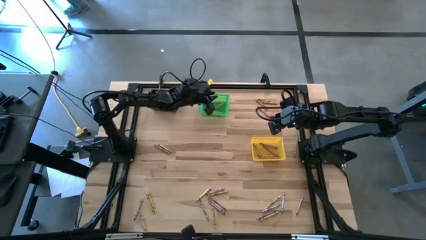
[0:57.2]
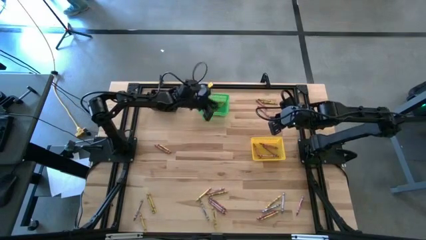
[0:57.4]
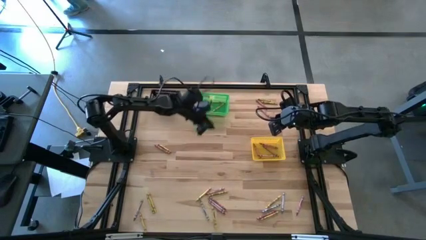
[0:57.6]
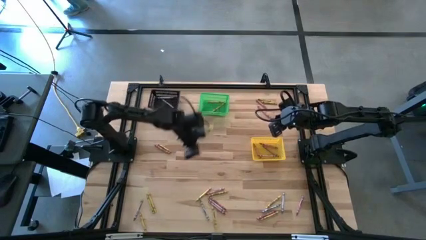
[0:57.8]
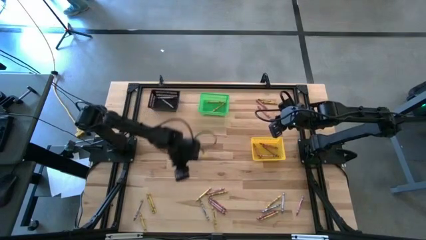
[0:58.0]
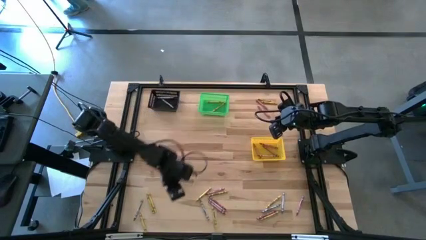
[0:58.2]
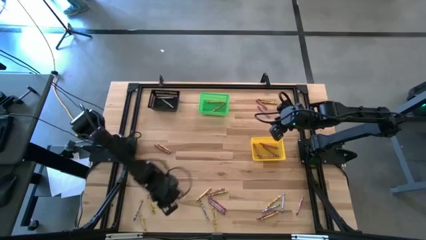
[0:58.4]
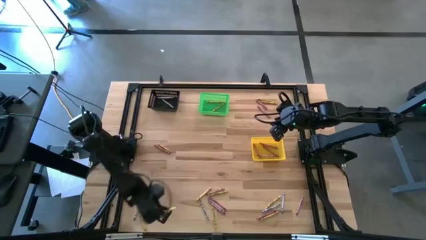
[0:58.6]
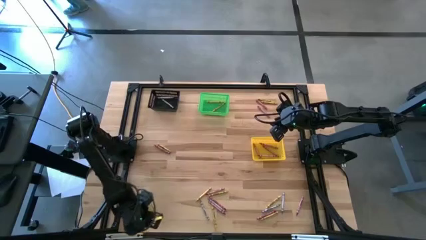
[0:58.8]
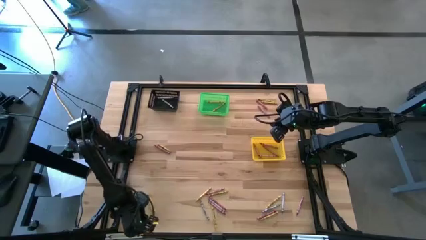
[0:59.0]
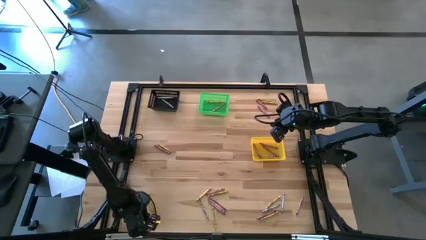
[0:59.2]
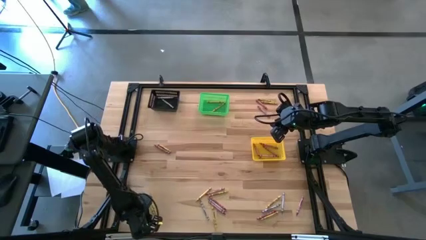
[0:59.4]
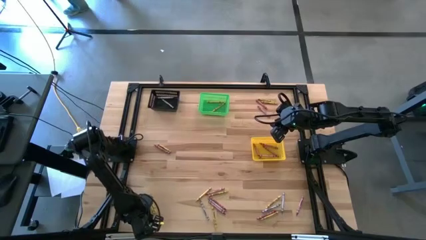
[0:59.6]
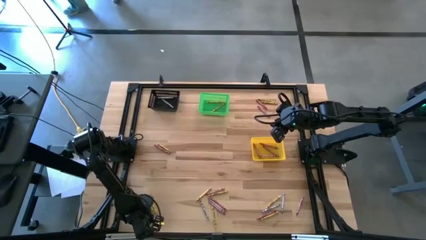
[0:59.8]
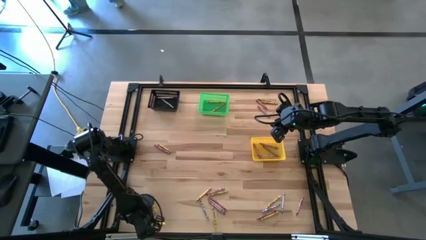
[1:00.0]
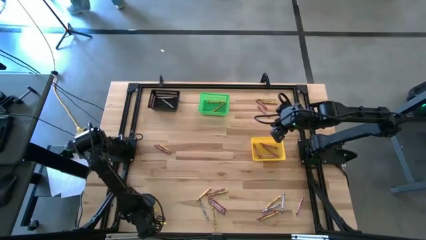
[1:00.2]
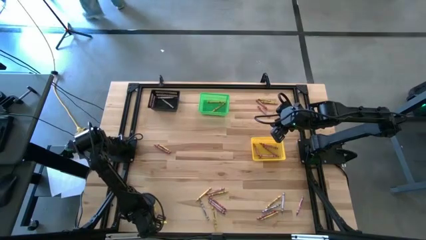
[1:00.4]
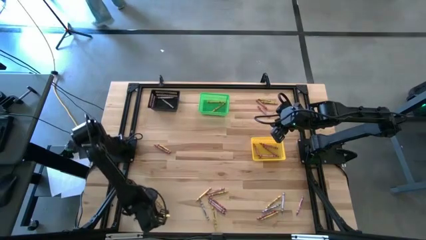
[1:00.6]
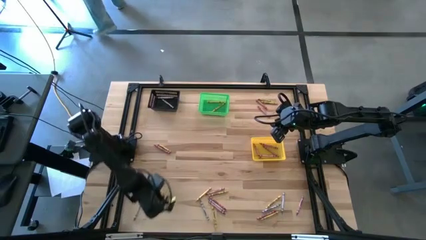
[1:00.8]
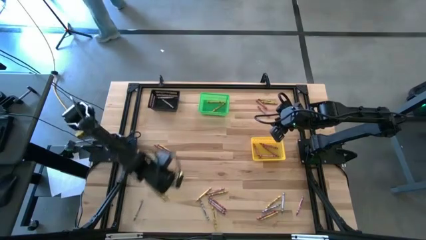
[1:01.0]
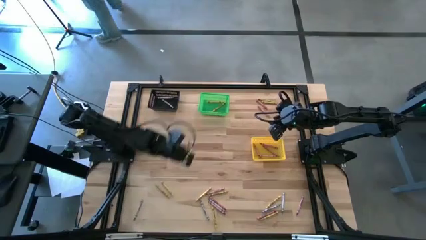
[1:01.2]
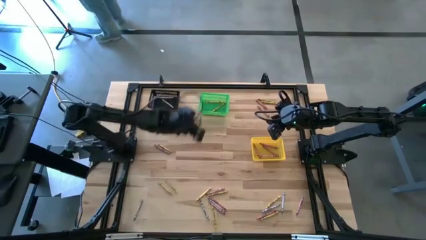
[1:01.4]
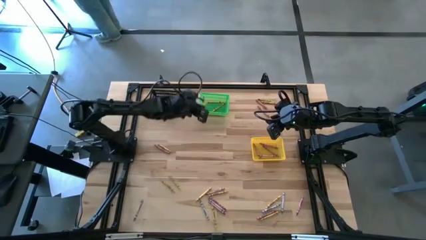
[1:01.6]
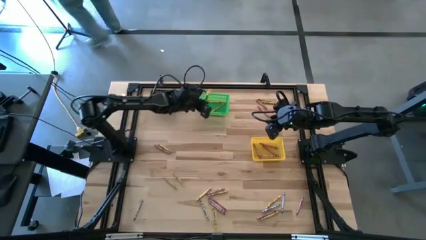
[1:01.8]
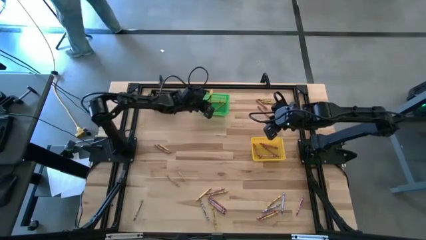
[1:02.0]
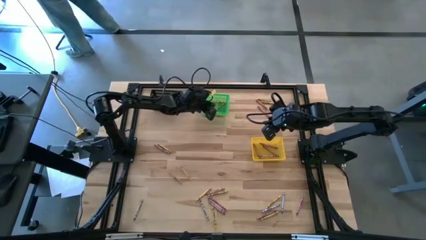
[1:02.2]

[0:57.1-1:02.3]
Task: Sort crayons
Put the yellow crayon into the green basket

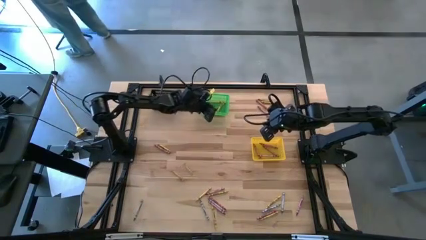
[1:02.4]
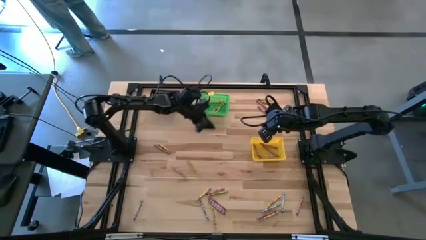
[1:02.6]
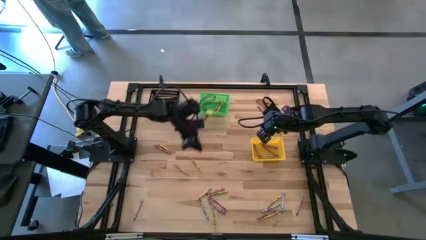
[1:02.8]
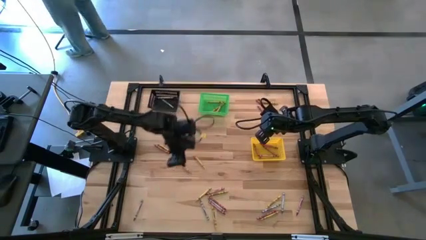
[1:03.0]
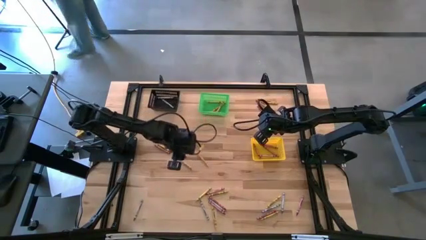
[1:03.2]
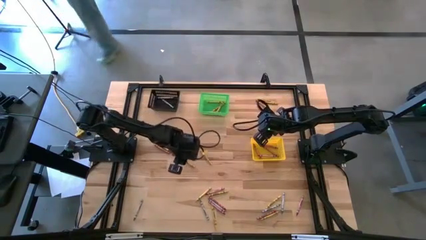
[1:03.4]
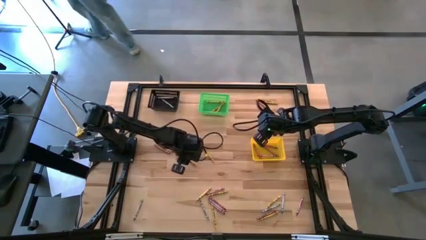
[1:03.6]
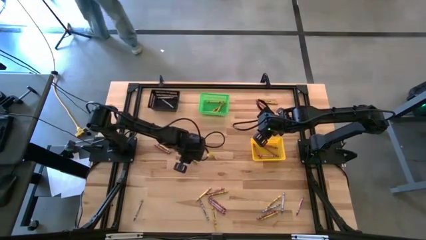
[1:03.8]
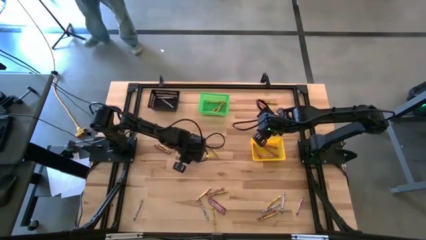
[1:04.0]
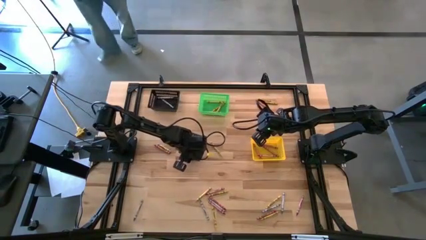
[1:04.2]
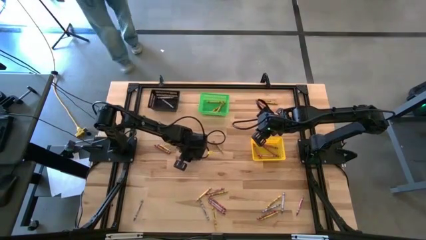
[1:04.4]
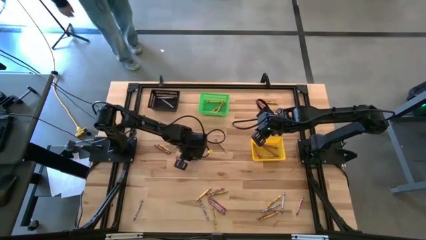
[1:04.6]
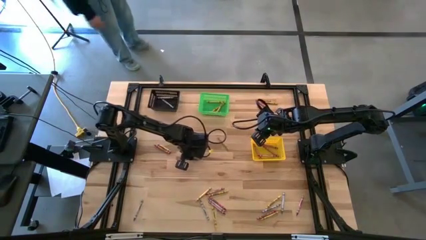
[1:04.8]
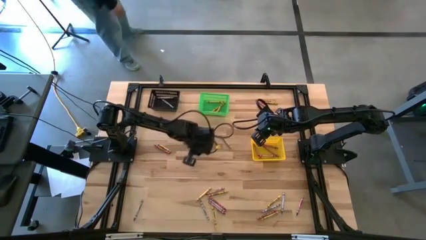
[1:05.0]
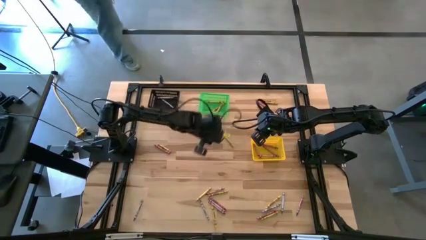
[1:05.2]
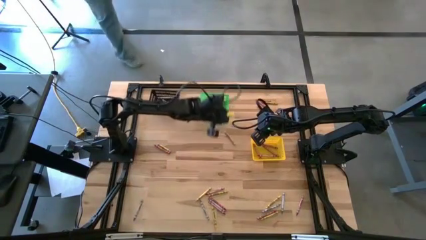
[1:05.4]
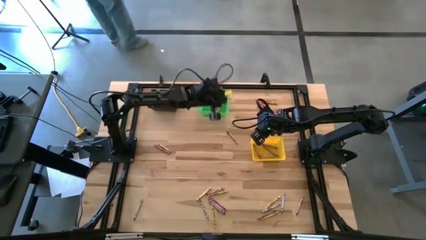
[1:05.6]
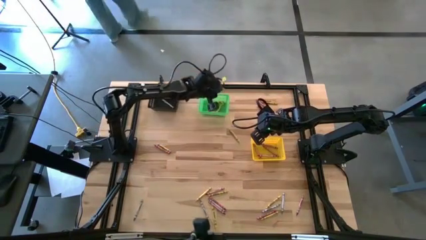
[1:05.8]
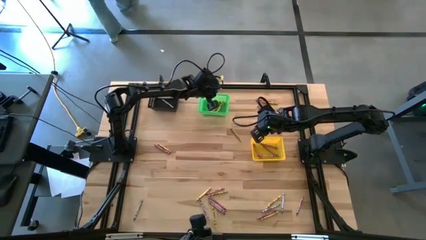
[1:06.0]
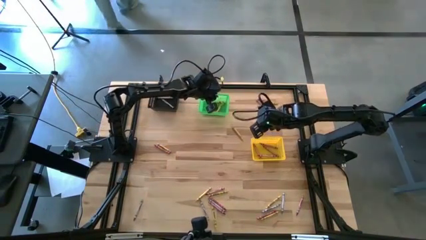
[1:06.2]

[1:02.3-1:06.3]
Put the yellow crayon into the green basket

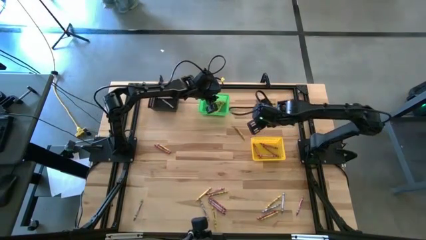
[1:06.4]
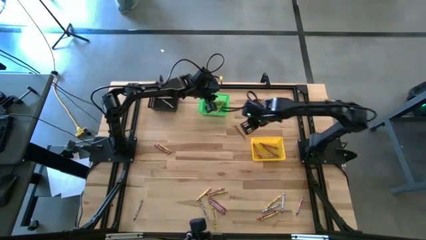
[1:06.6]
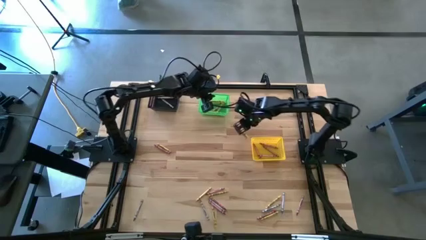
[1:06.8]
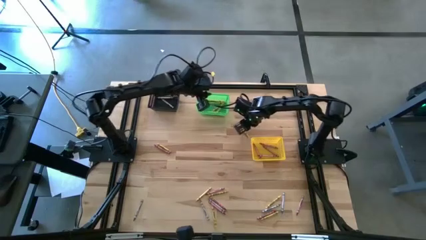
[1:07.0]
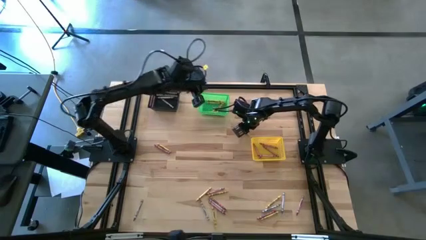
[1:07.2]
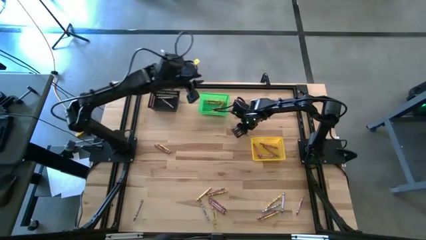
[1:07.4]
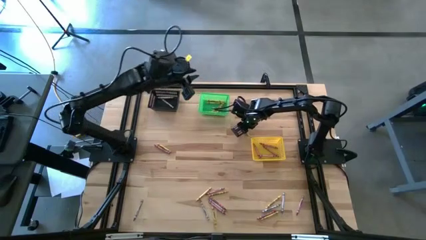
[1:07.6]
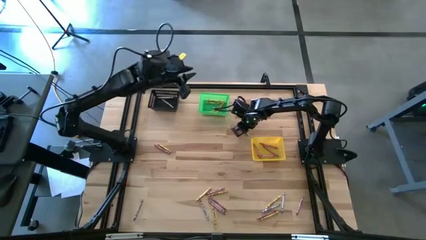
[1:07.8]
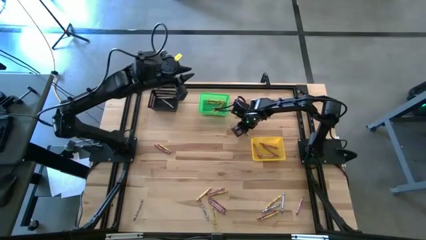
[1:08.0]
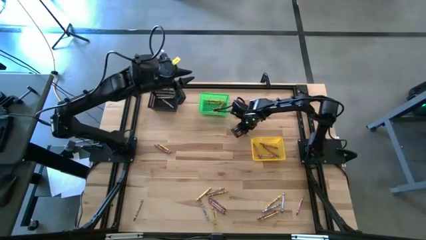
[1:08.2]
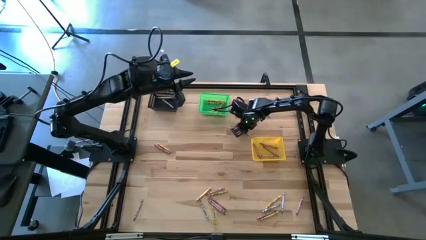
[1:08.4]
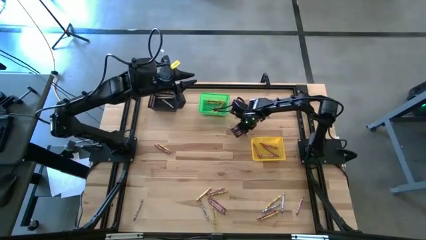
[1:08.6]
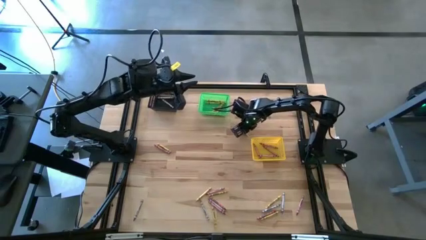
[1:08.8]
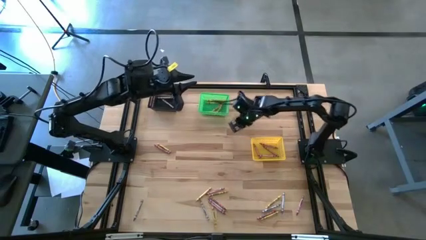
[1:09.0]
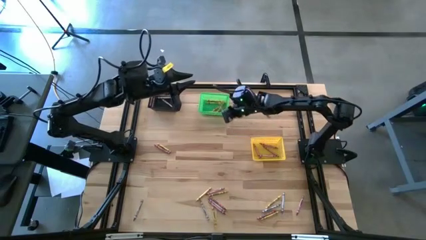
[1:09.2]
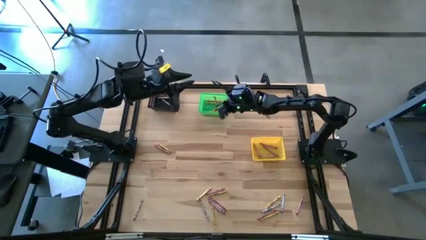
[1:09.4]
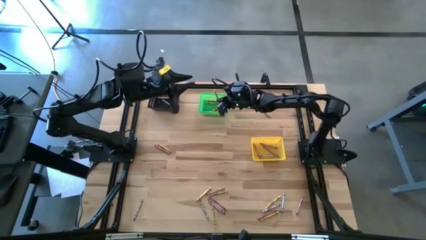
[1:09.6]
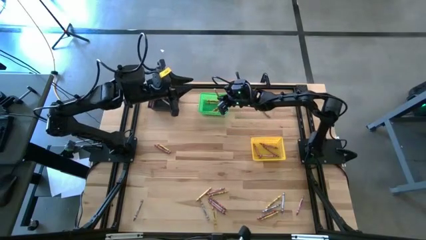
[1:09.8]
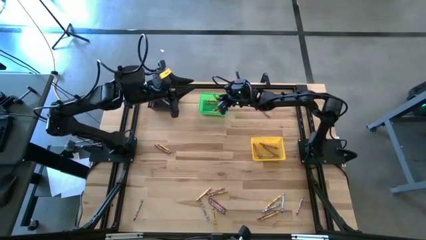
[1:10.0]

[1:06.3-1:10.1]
Put the yellow crayon into the green basket

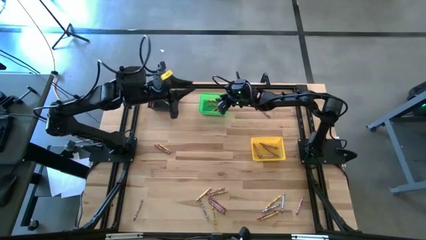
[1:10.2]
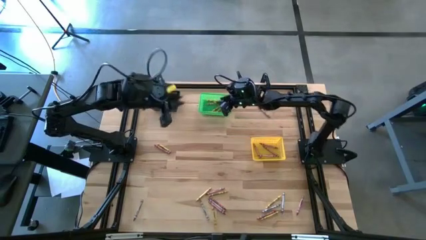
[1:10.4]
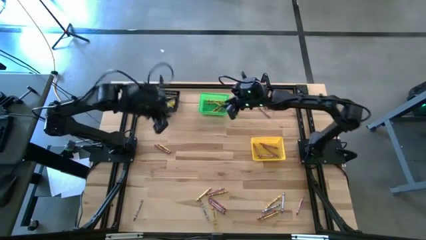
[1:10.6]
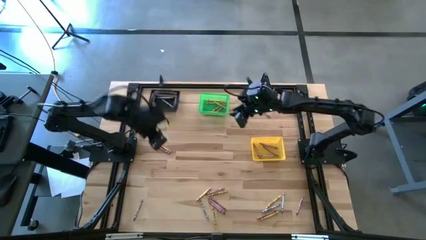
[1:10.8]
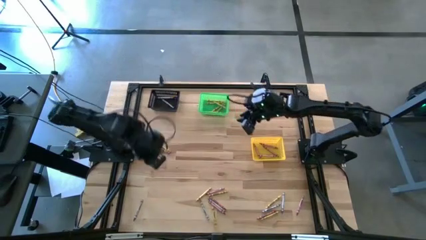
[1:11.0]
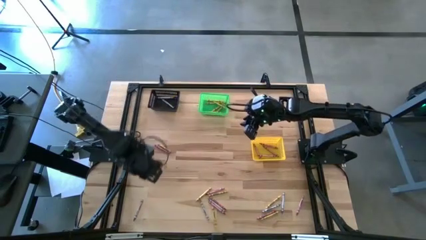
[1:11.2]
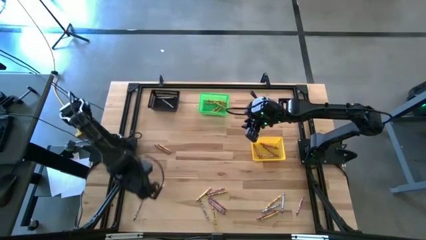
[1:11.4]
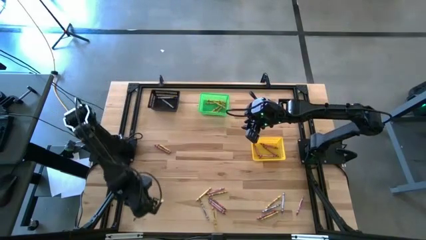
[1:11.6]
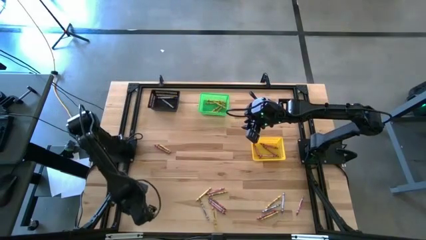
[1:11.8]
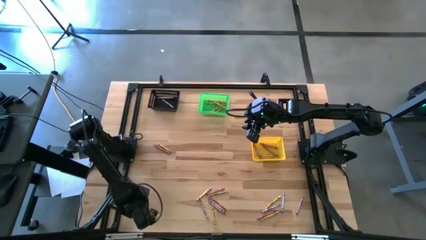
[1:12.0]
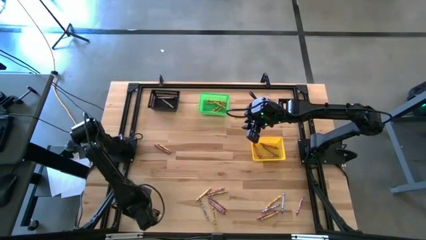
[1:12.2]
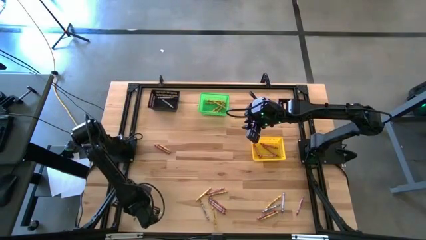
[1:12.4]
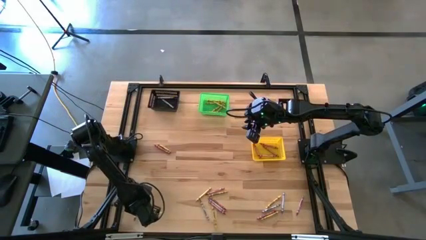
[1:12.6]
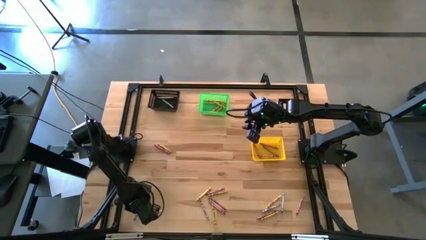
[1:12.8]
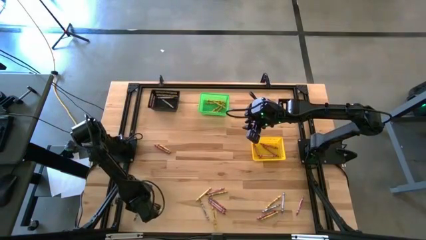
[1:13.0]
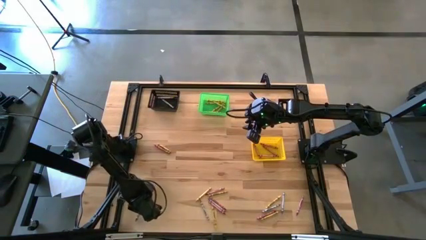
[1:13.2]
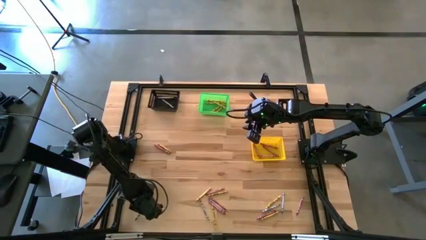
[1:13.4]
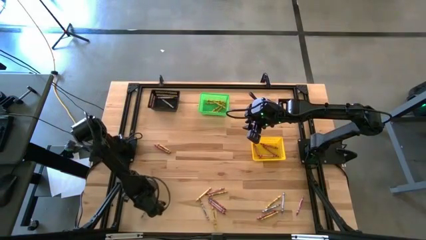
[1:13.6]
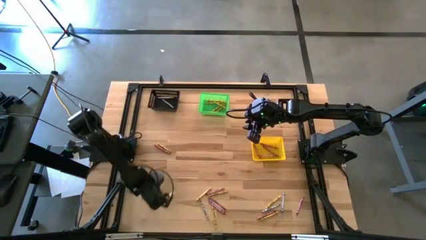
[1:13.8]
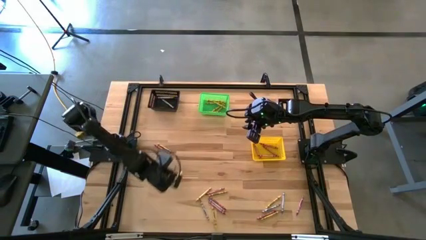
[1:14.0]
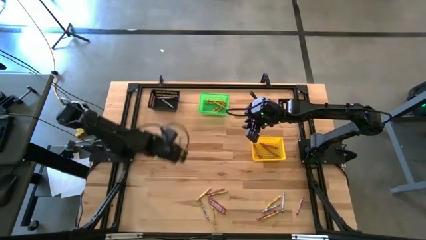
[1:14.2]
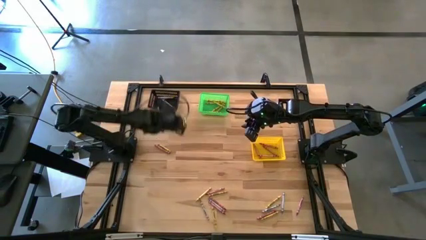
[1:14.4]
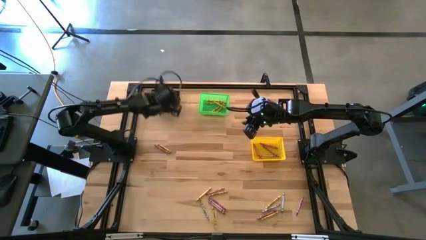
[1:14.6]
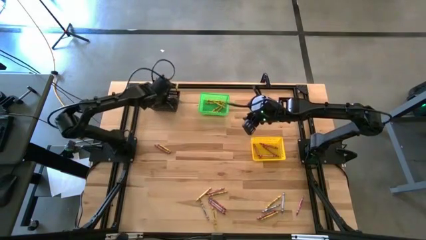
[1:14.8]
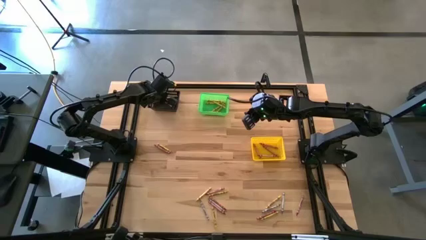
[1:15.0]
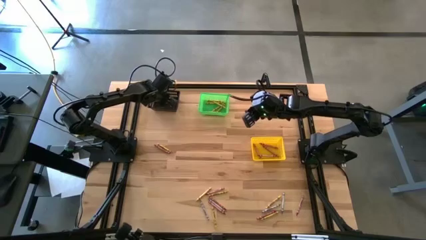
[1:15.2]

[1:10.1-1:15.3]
Put the gray crayon into the black basket
